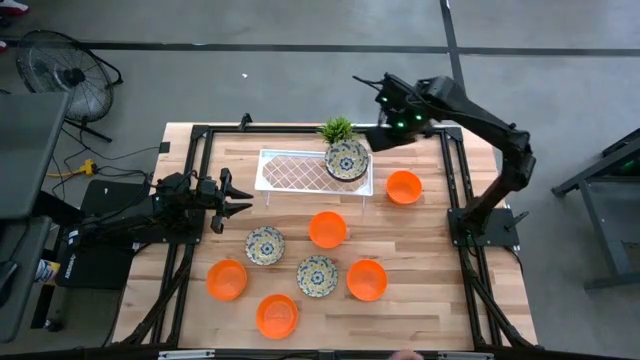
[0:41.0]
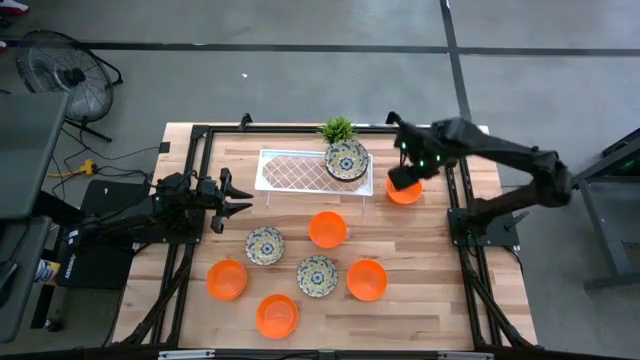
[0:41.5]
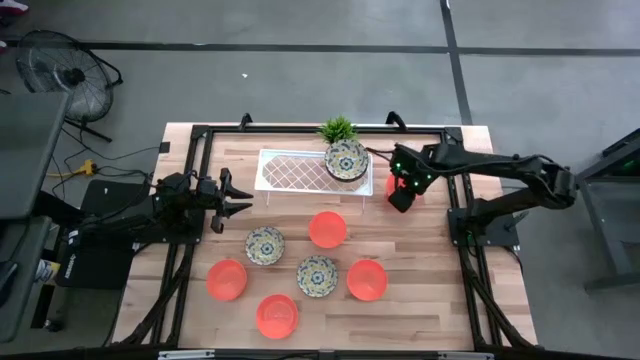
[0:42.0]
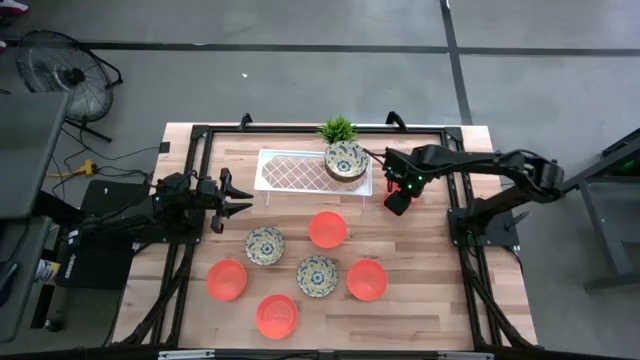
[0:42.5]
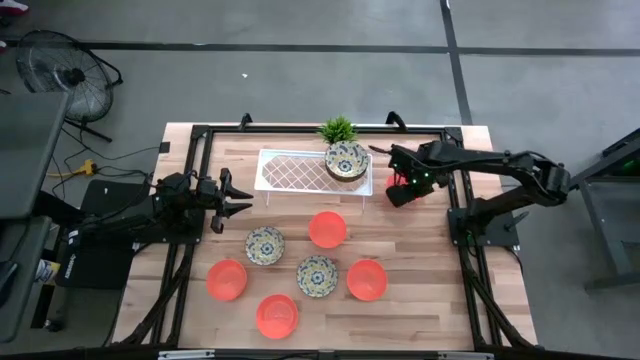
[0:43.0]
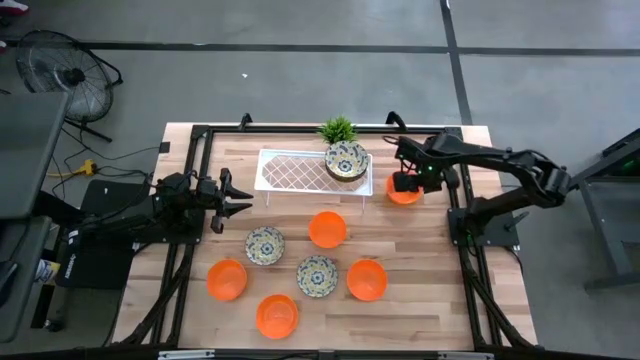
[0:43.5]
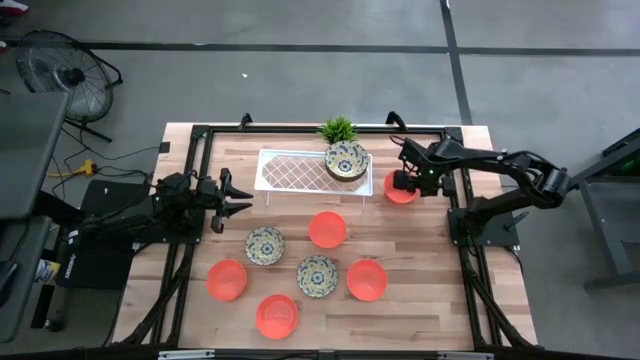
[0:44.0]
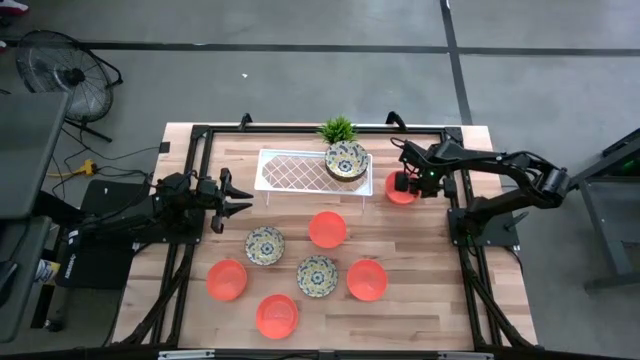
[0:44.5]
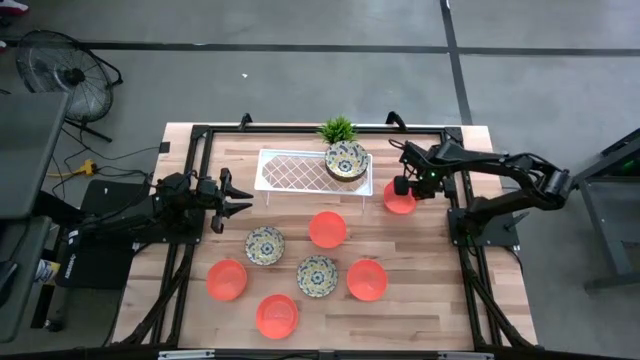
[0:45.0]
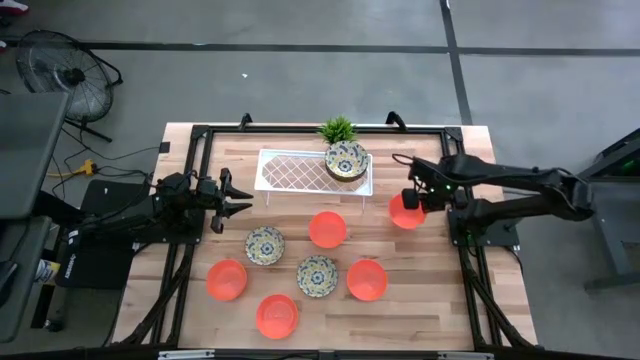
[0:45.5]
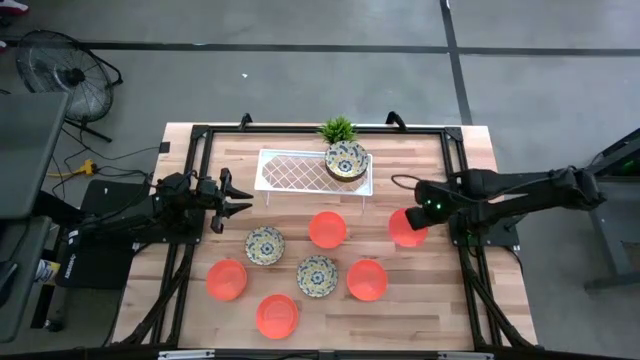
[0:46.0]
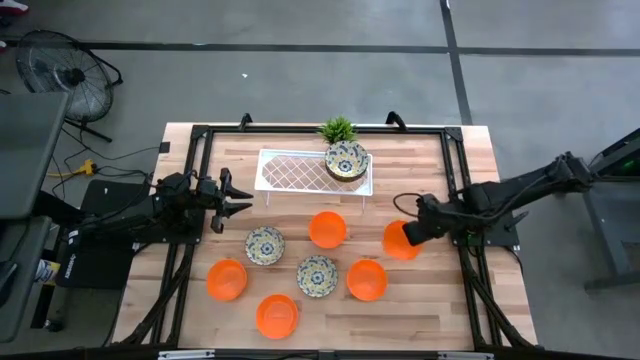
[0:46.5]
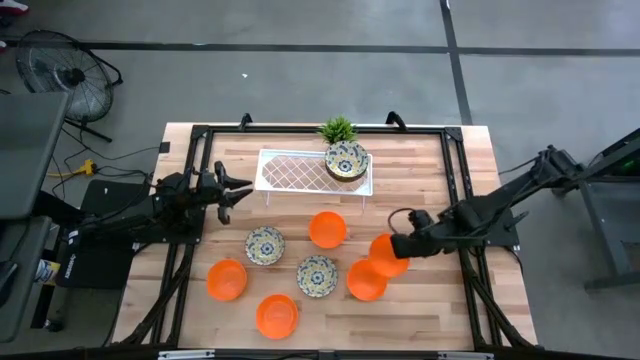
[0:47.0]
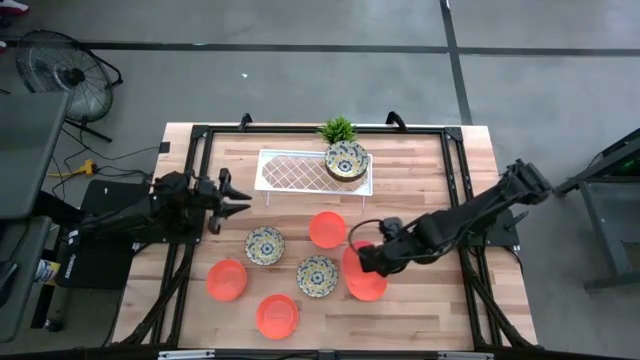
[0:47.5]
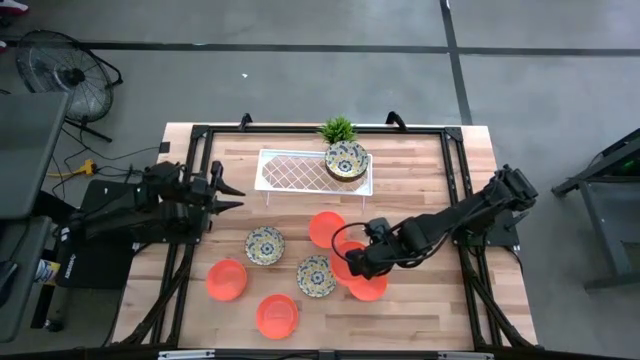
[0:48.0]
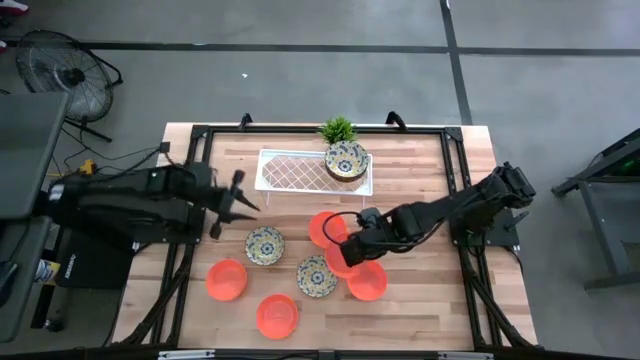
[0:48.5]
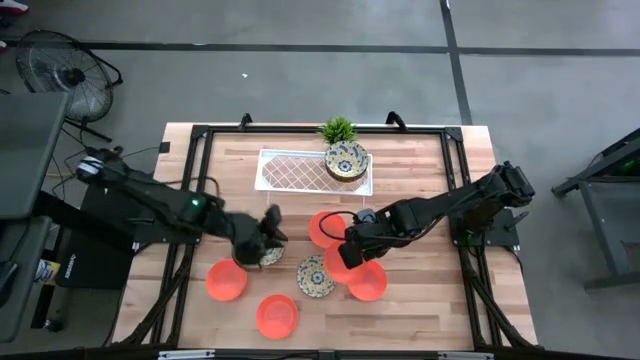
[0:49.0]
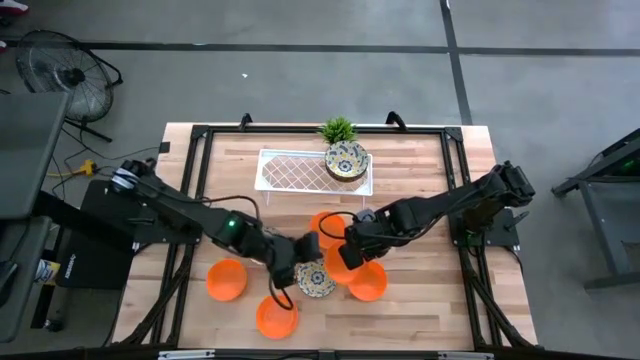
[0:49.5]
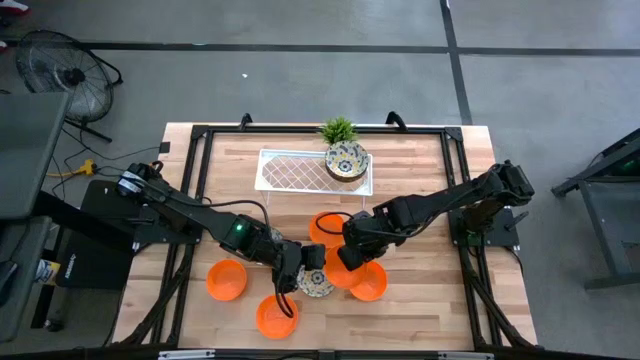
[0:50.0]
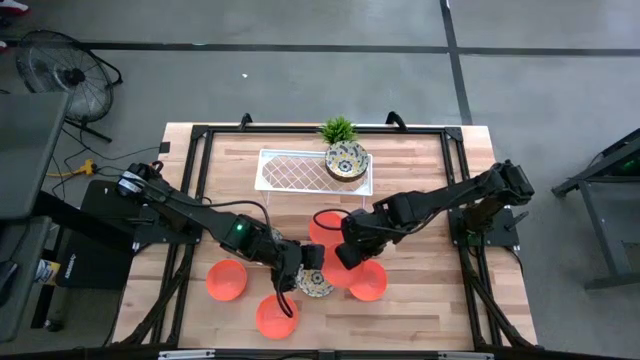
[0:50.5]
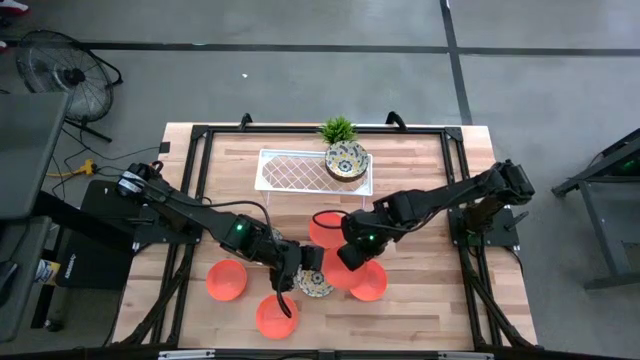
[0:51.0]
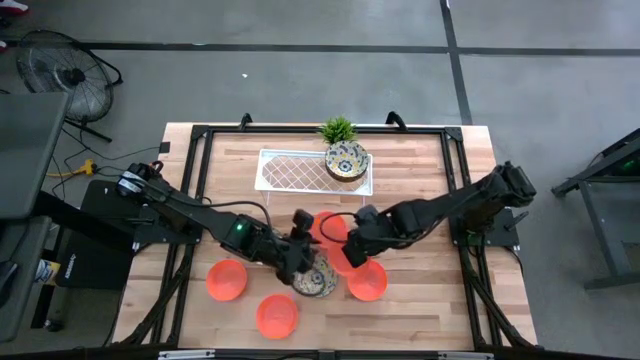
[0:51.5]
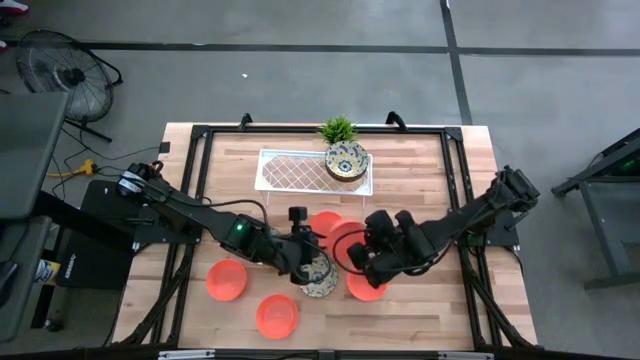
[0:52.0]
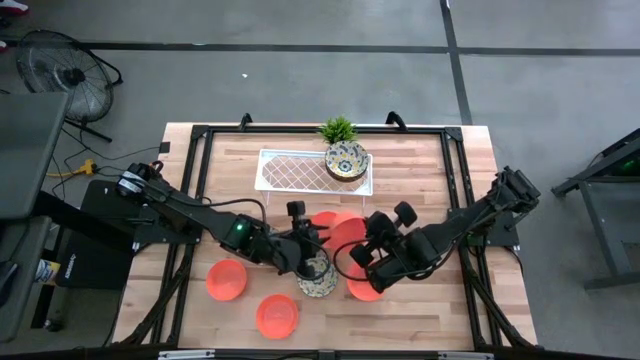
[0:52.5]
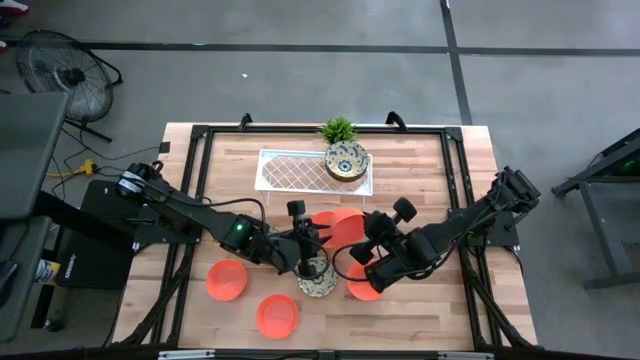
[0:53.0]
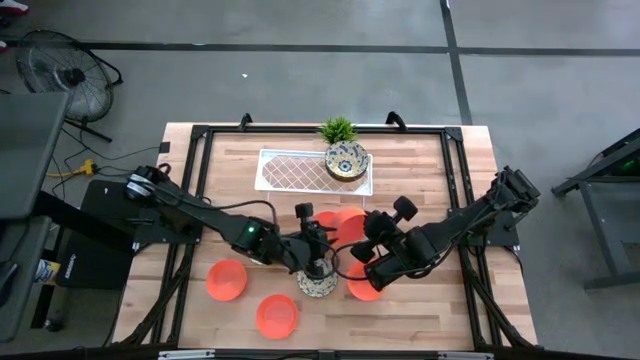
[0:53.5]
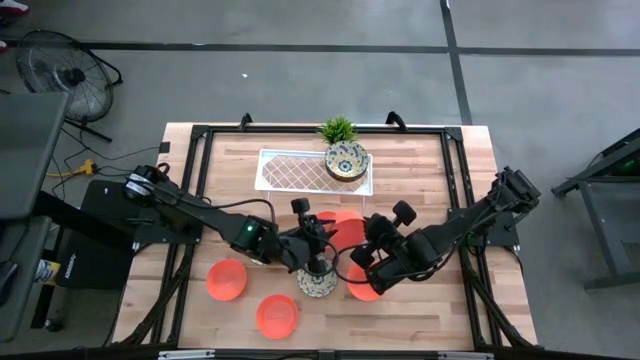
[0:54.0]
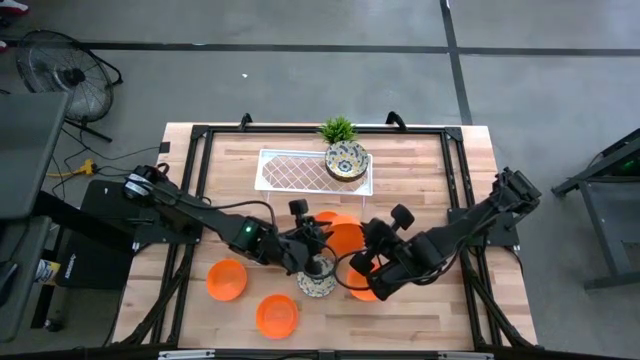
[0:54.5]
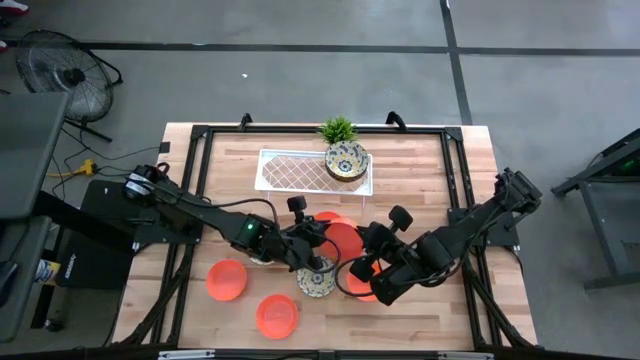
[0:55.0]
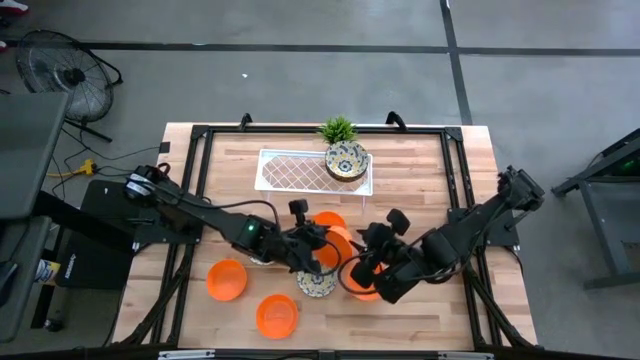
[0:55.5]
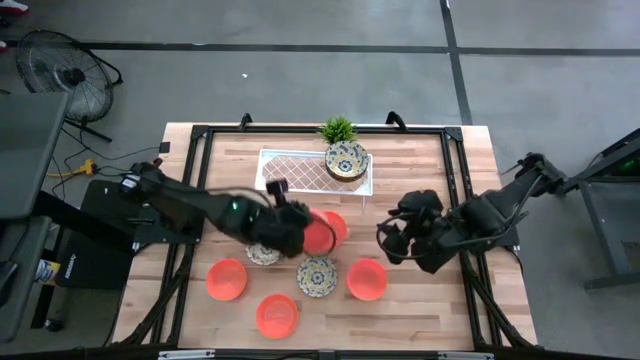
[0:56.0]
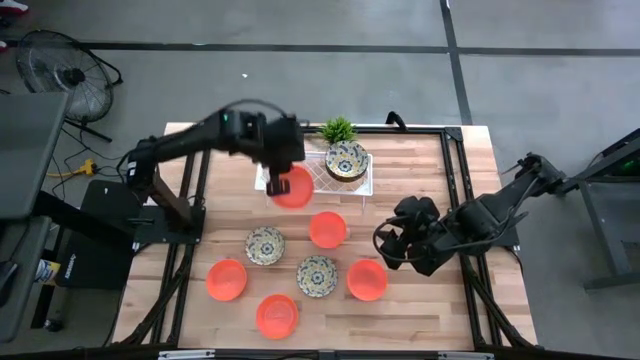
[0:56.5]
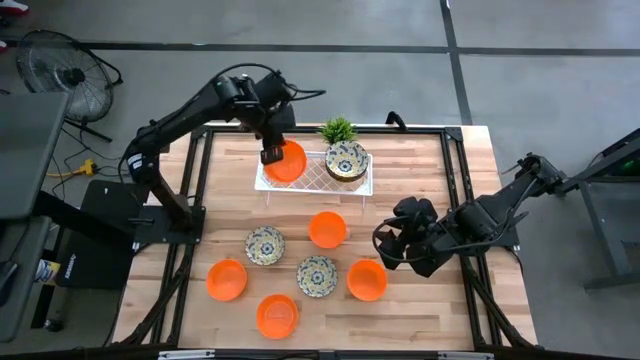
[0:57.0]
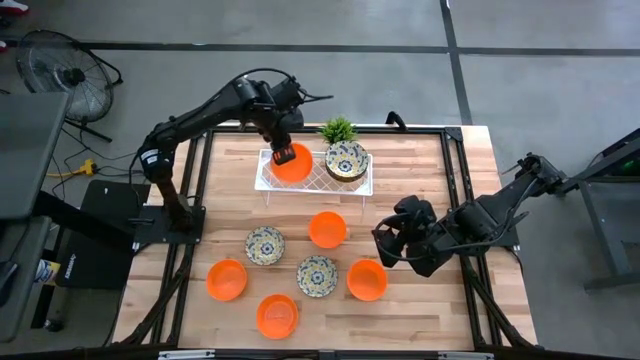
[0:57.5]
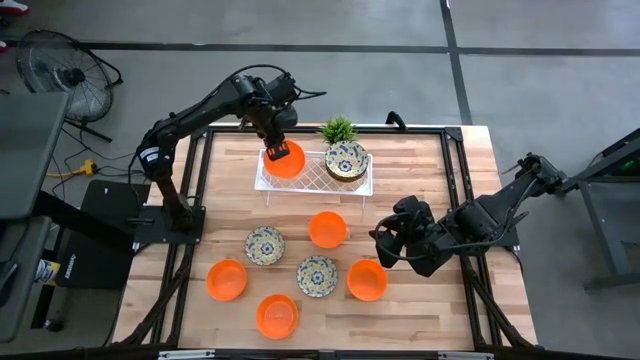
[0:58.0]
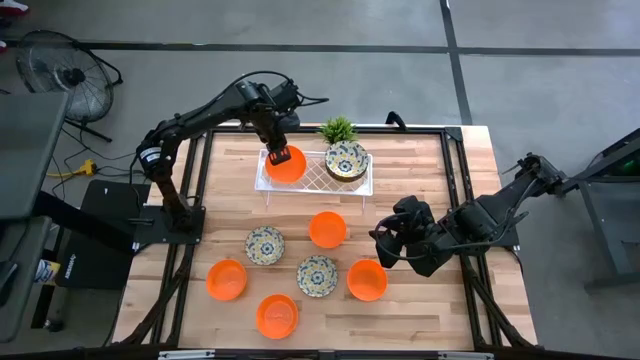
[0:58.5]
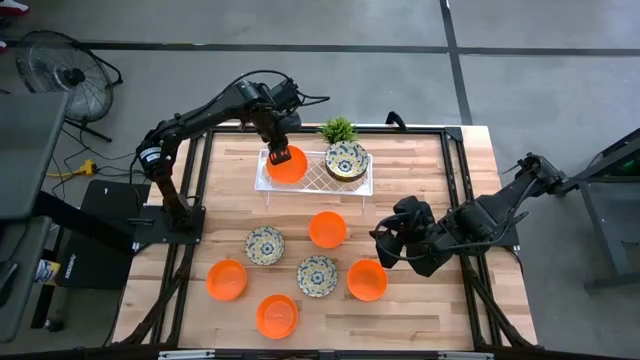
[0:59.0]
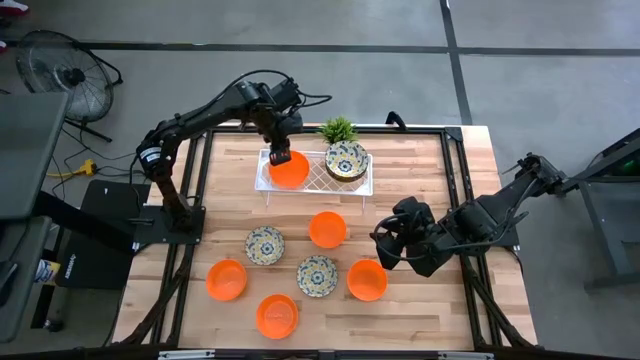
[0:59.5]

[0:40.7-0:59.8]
Task: Pick & Place Mini bowls
Put the orange bowl on the shelf

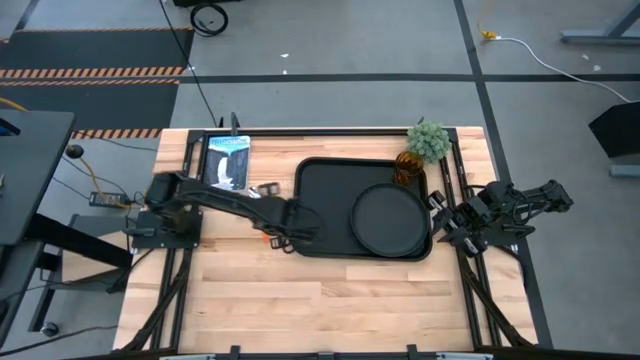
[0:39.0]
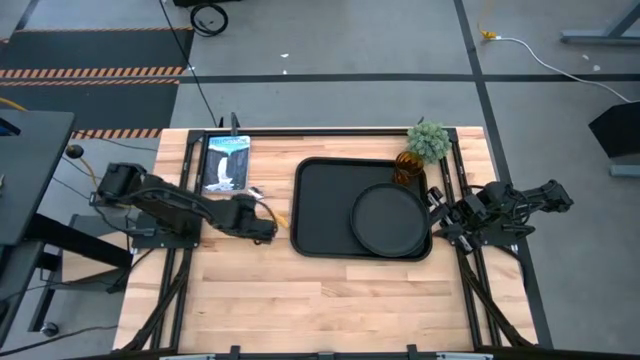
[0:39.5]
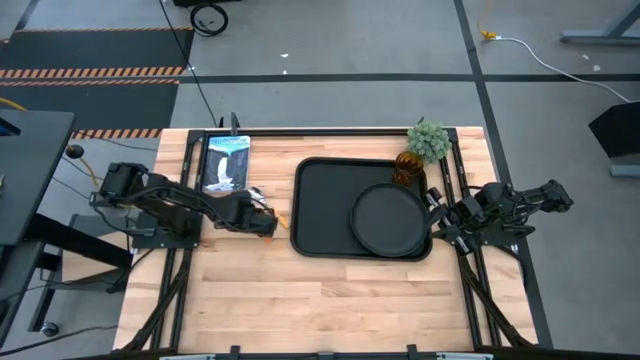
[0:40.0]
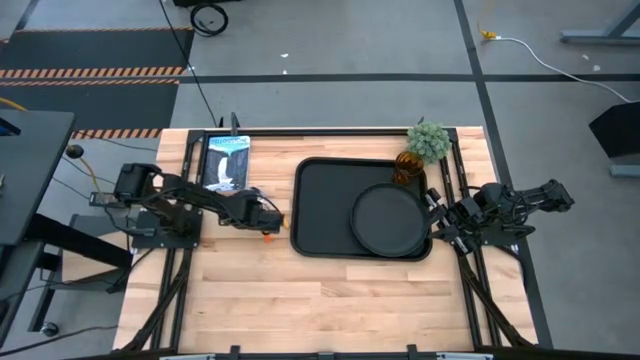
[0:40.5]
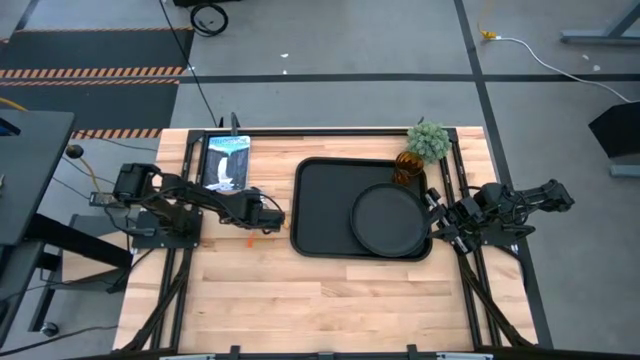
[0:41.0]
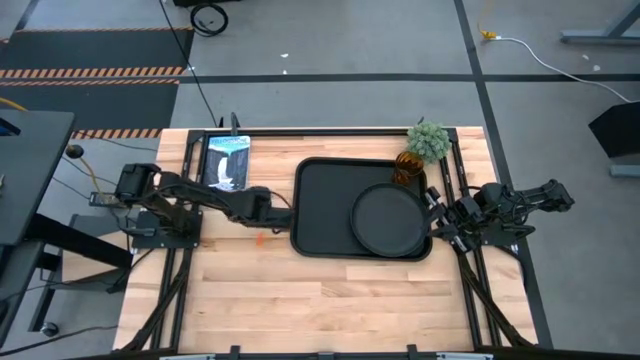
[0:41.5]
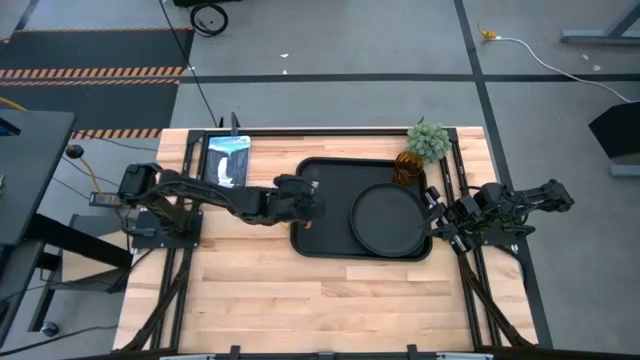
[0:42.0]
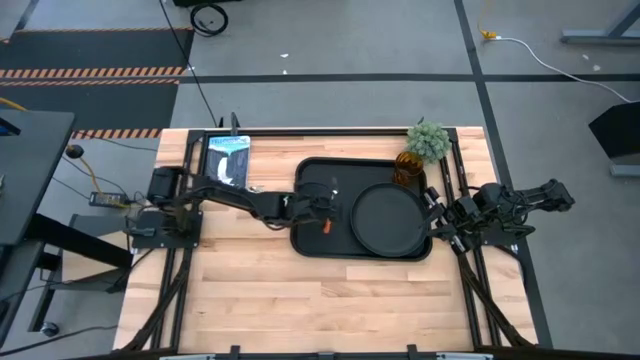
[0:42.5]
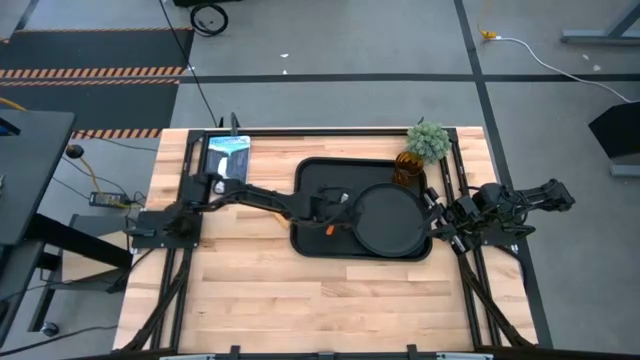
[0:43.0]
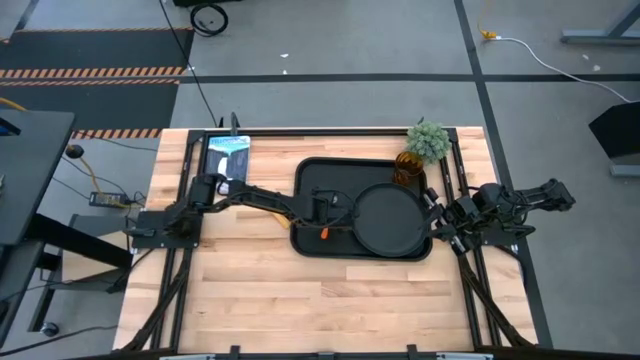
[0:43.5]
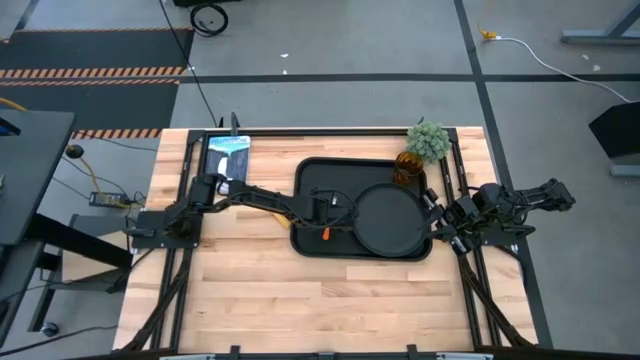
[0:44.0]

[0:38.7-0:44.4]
Task: Pick and place plate/cup/fork/spoon on tray
Put the orange fork to the left of the black plate on the black table tray
